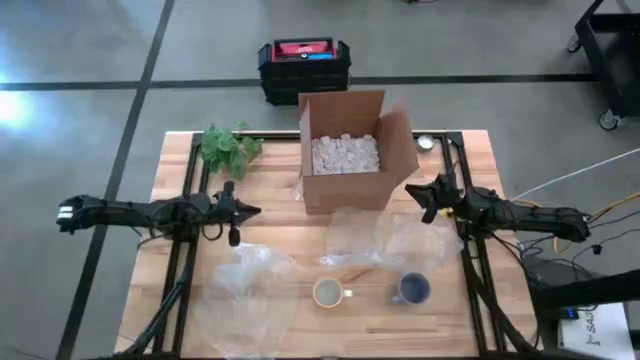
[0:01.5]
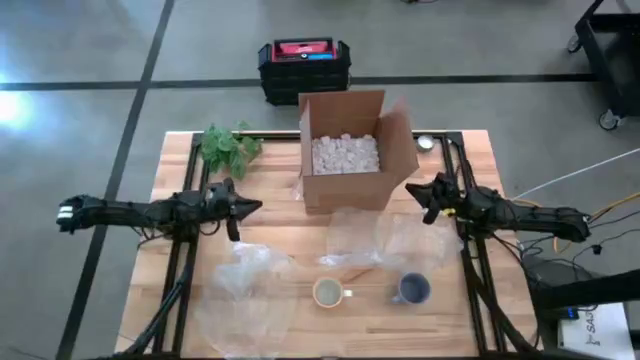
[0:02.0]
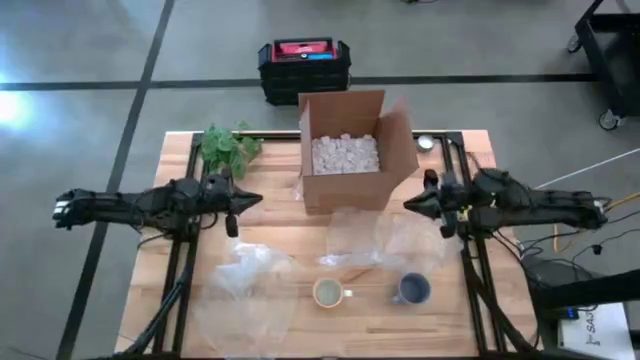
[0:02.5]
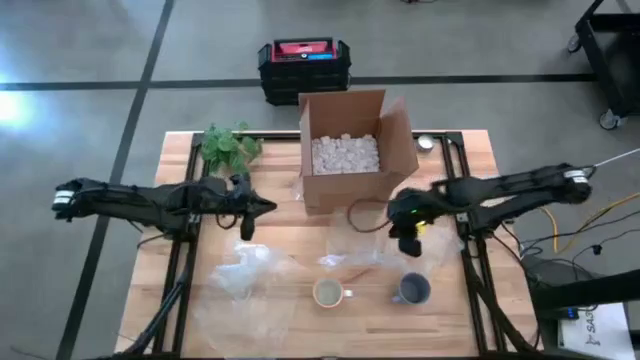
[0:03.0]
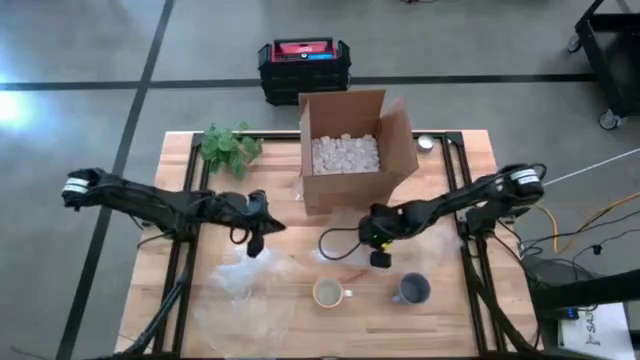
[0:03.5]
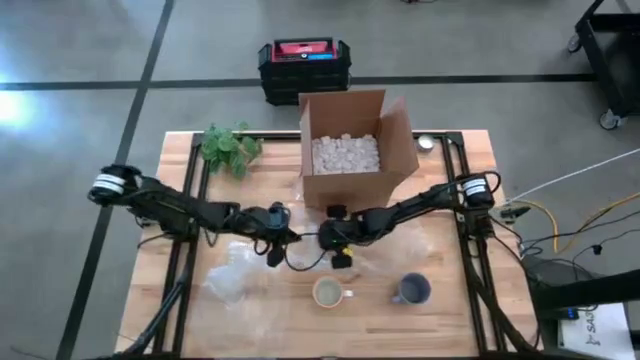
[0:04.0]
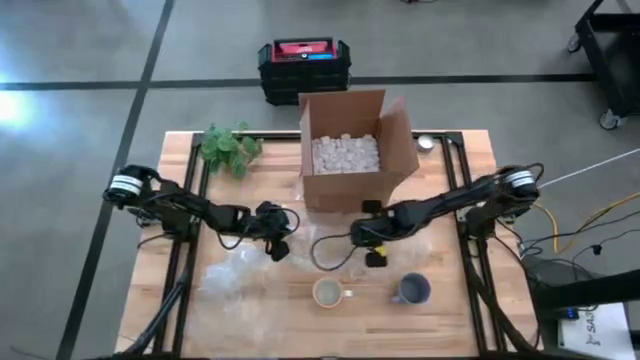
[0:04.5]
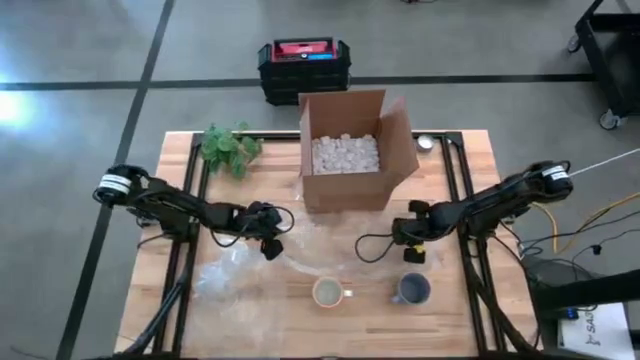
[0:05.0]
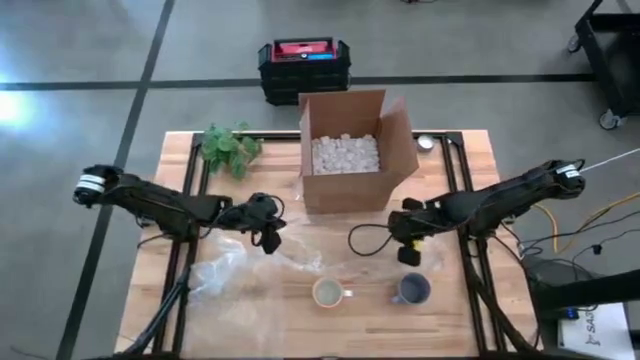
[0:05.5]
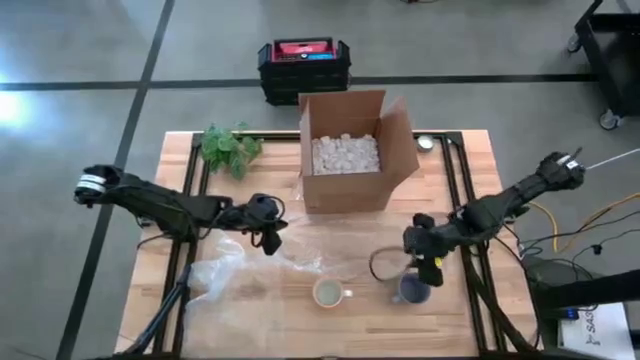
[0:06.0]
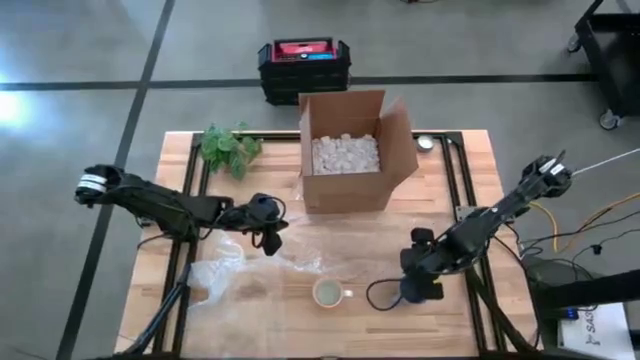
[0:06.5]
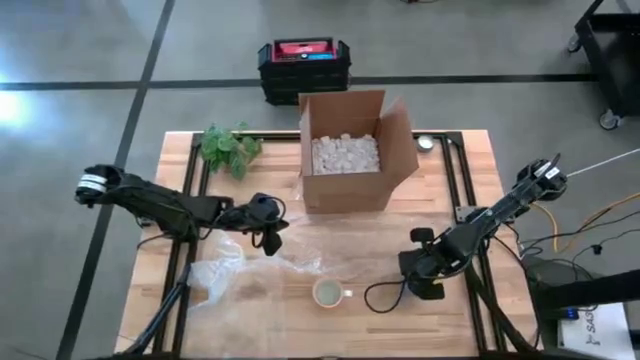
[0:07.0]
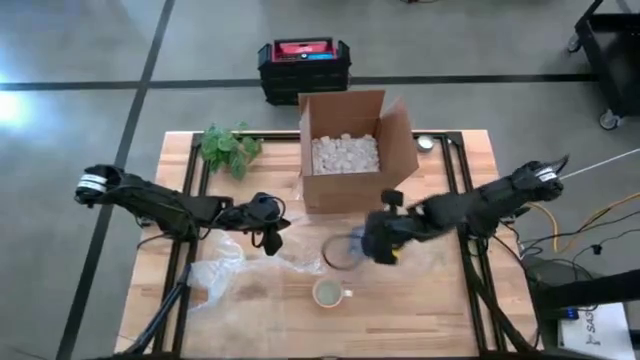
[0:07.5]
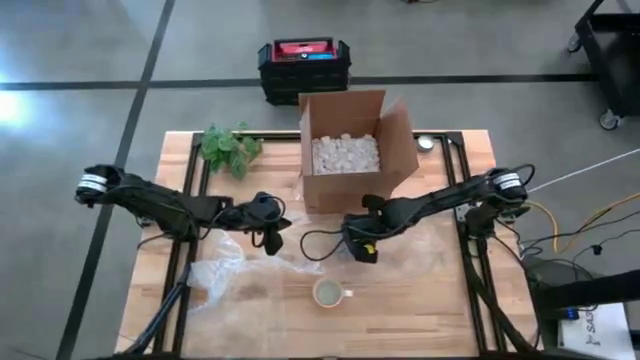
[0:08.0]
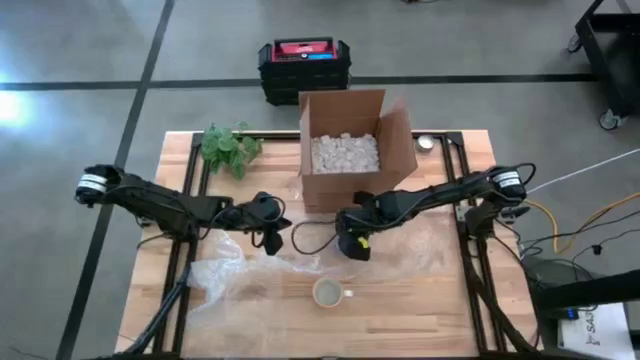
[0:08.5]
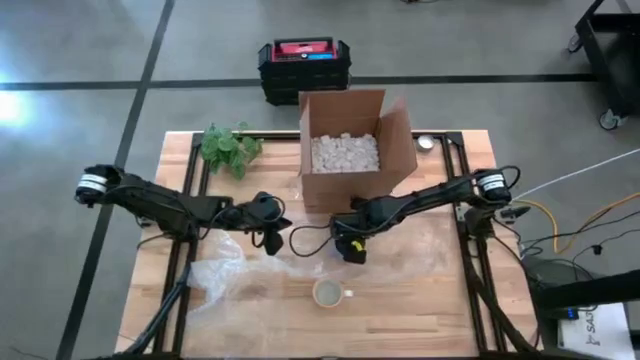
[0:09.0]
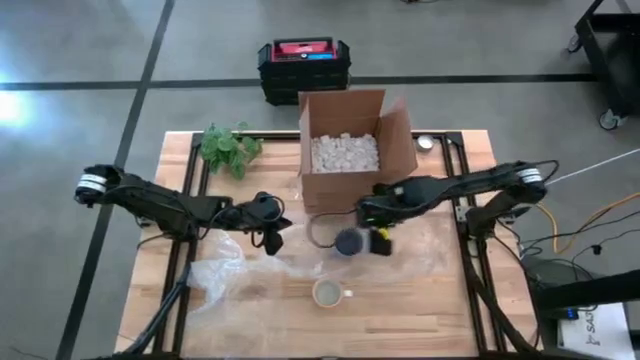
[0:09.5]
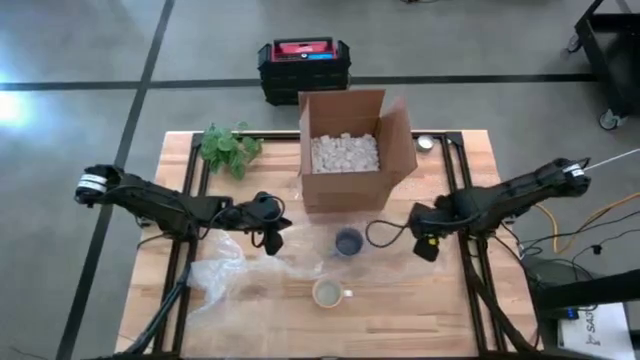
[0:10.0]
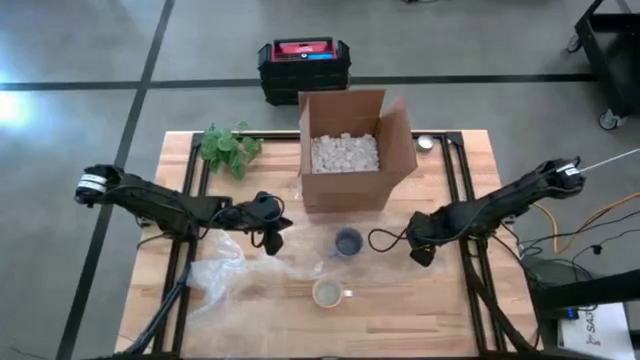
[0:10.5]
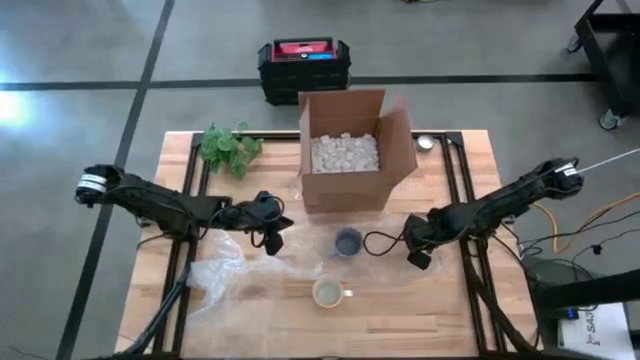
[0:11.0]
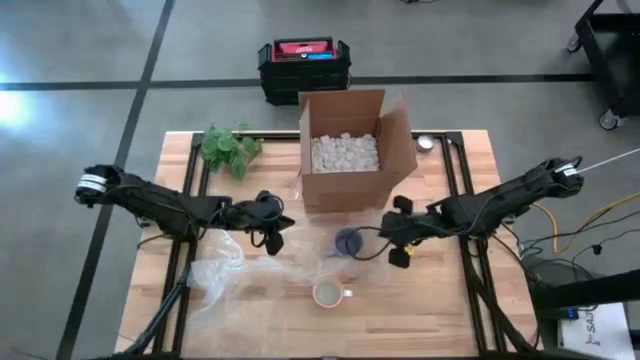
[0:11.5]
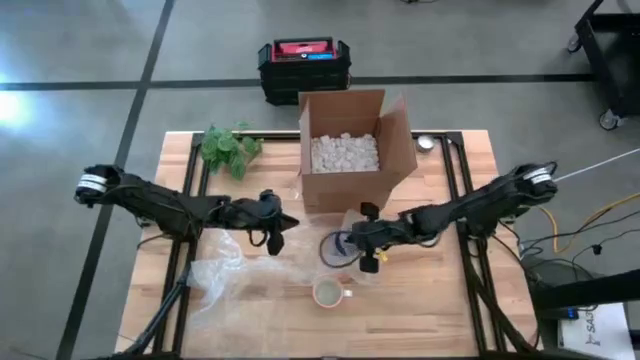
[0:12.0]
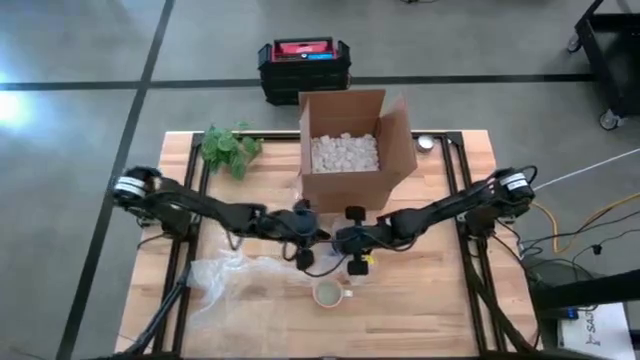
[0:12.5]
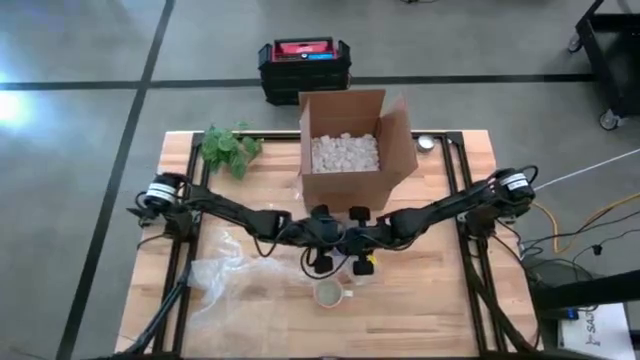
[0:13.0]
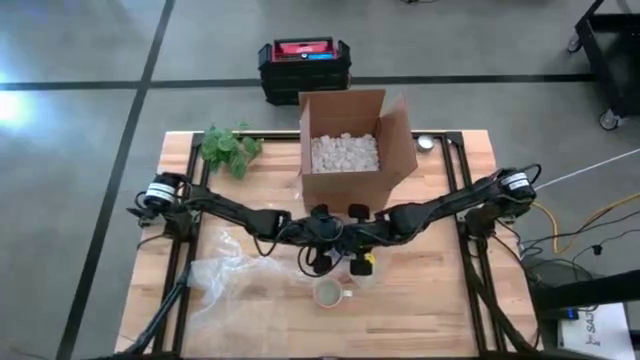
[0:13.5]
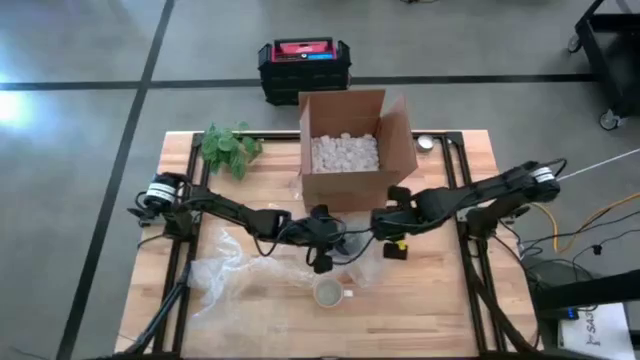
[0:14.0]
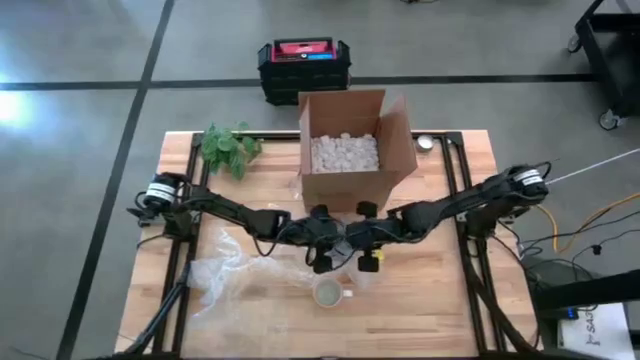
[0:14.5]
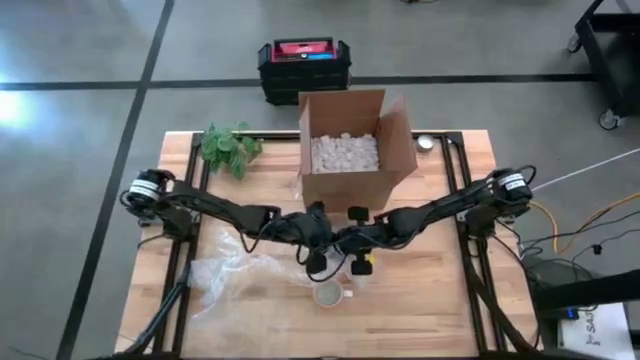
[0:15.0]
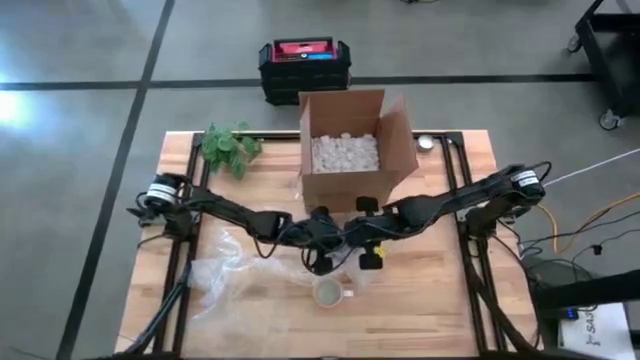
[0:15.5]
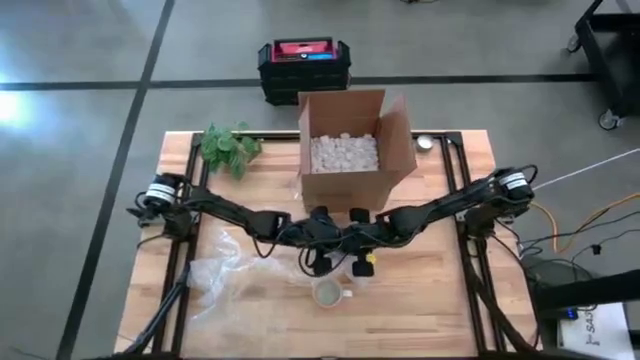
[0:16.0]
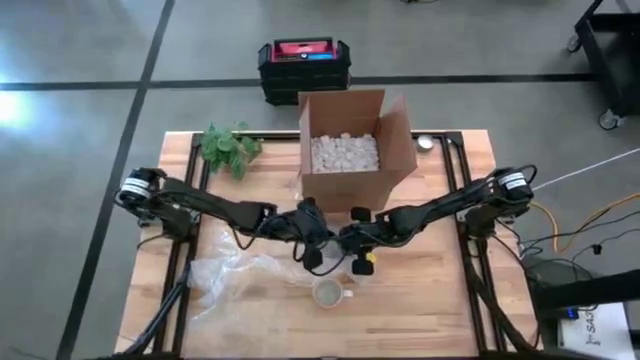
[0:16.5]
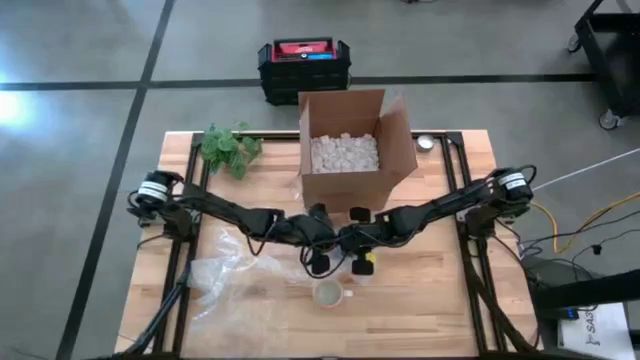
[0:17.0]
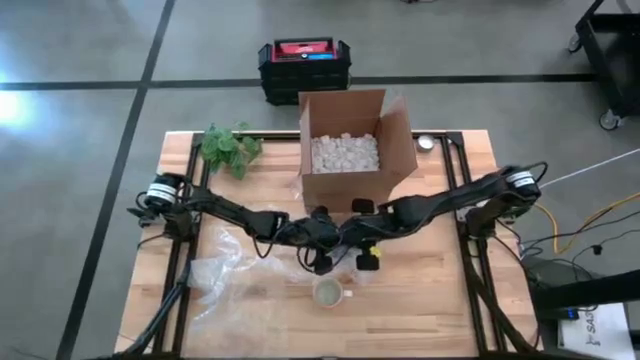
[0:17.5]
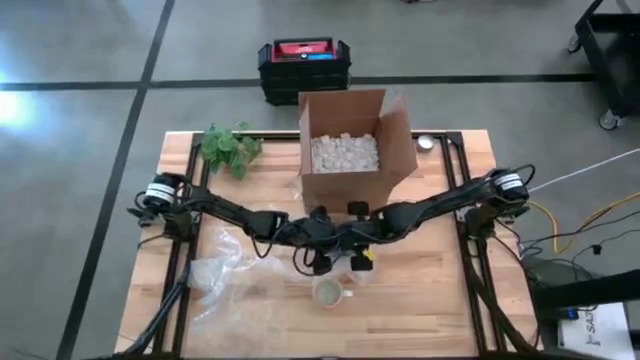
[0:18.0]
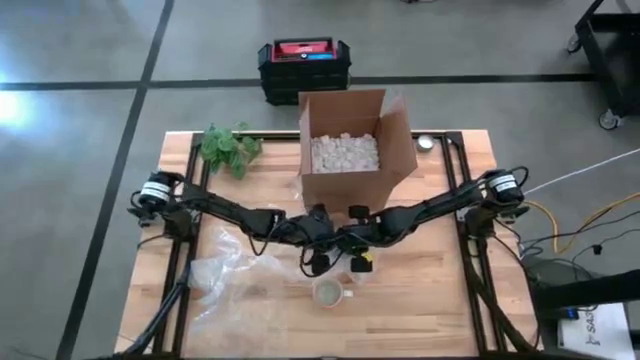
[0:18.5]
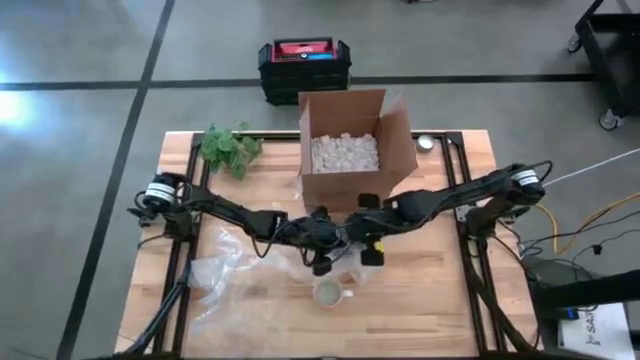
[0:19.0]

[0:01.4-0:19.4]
Task: wrap mug
Wrap the purple mug with bubble wrap
